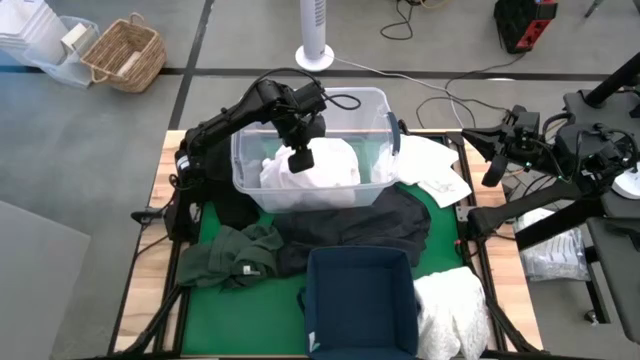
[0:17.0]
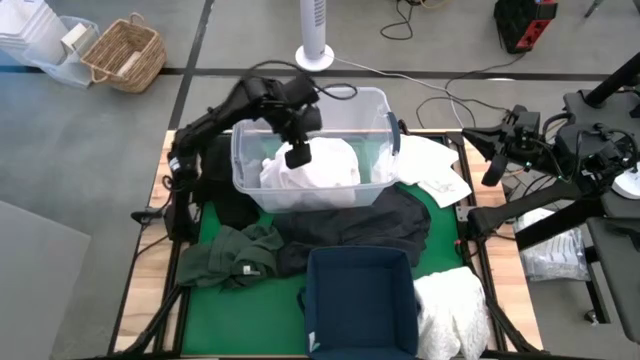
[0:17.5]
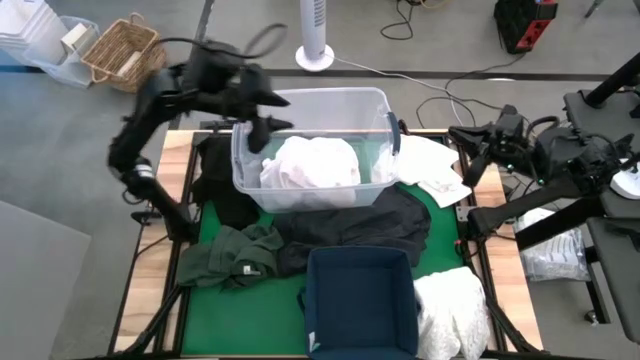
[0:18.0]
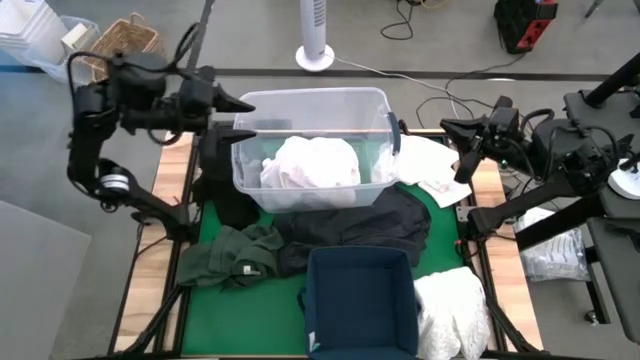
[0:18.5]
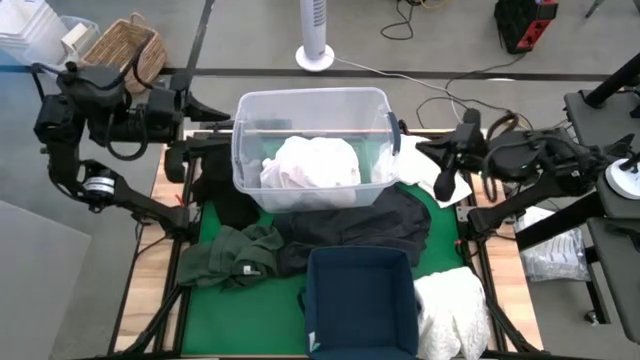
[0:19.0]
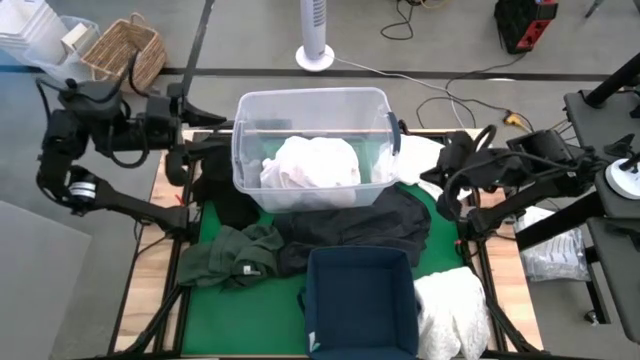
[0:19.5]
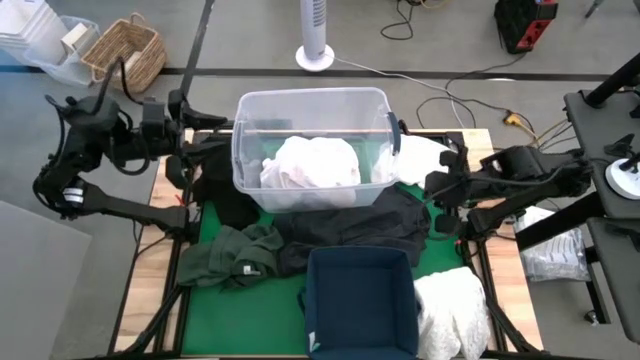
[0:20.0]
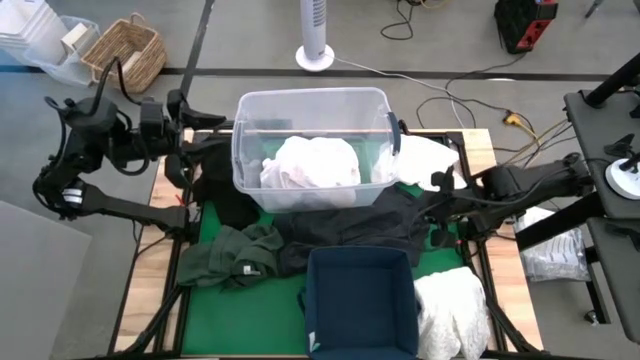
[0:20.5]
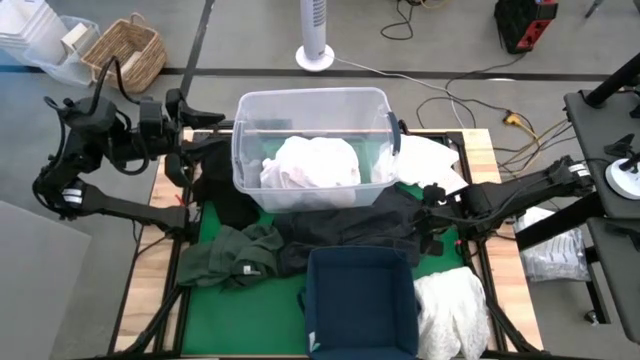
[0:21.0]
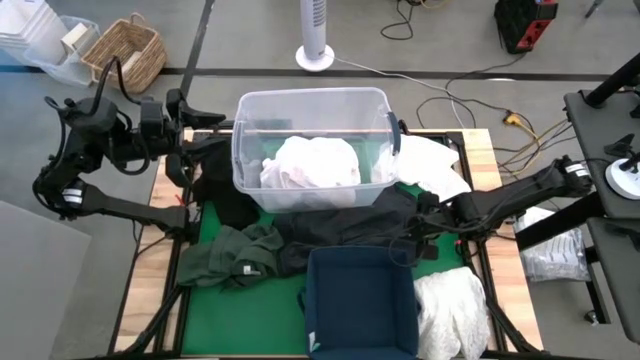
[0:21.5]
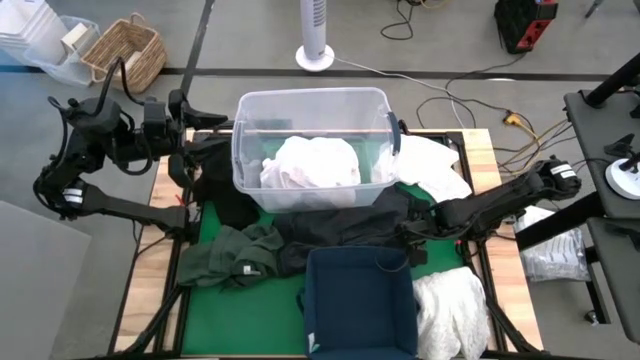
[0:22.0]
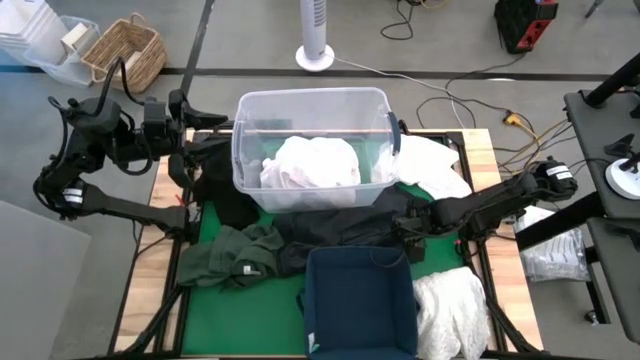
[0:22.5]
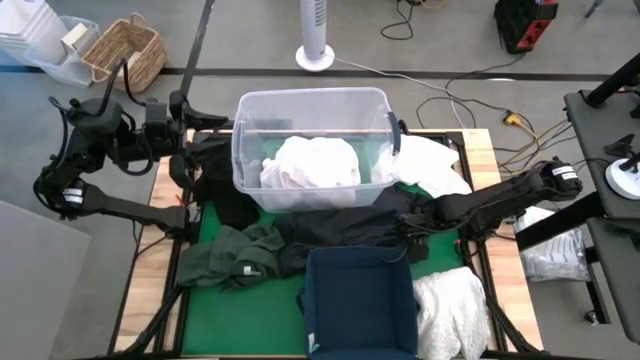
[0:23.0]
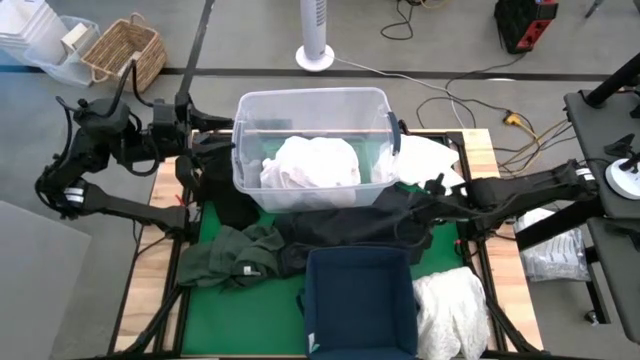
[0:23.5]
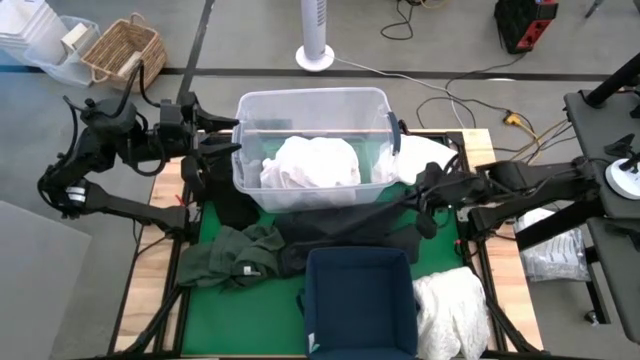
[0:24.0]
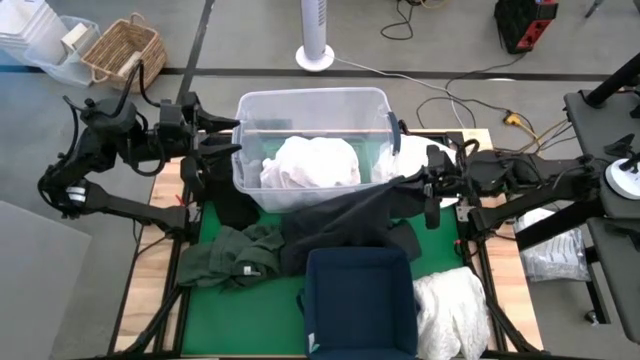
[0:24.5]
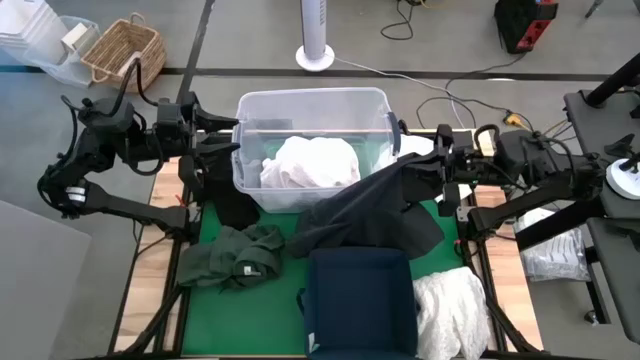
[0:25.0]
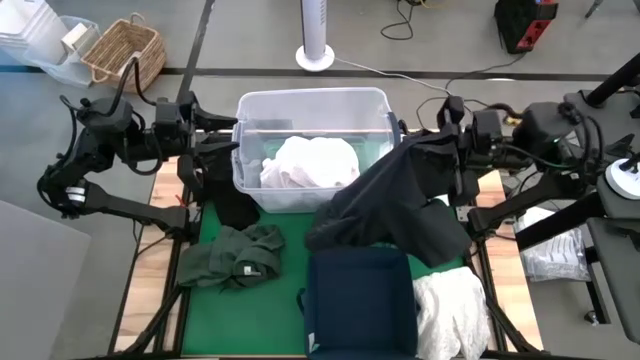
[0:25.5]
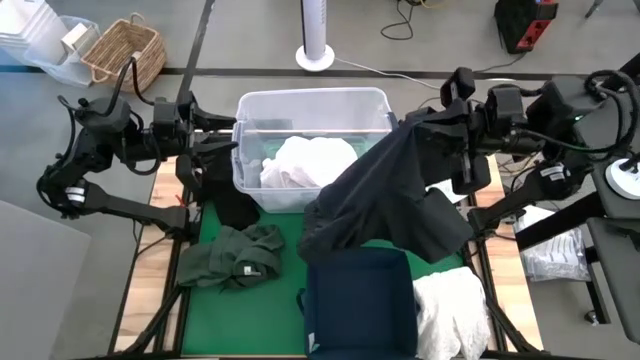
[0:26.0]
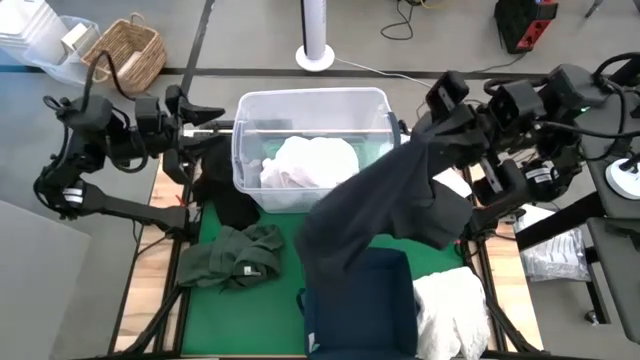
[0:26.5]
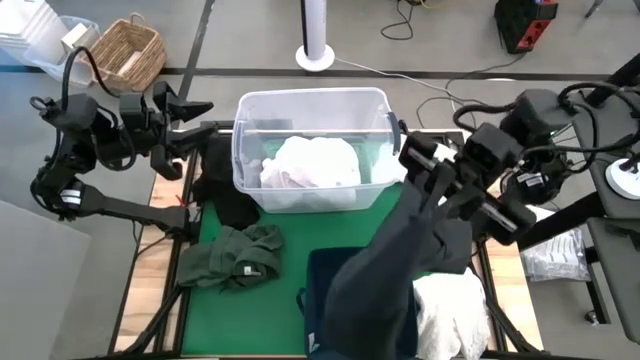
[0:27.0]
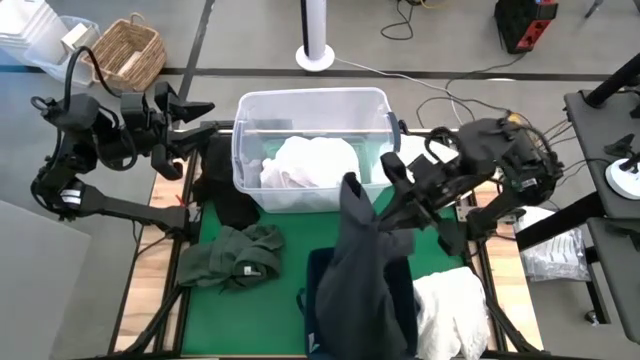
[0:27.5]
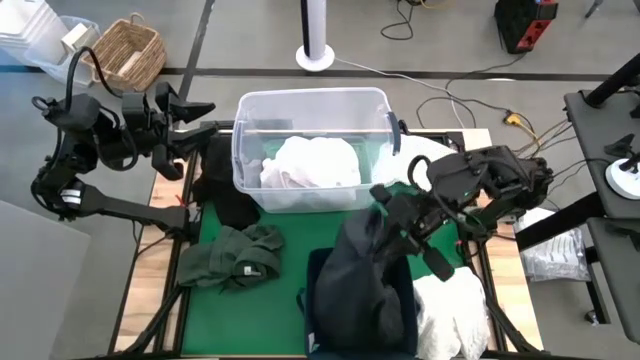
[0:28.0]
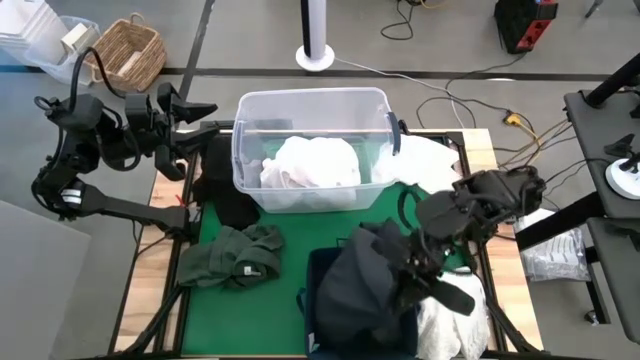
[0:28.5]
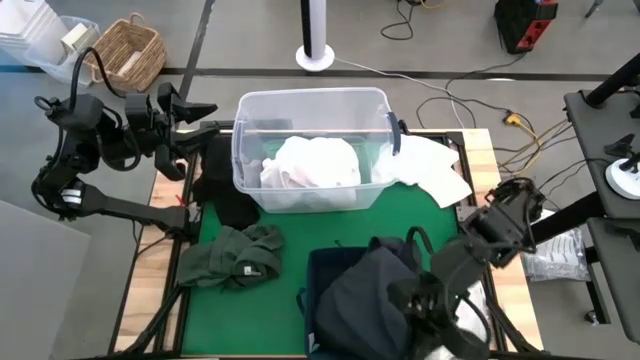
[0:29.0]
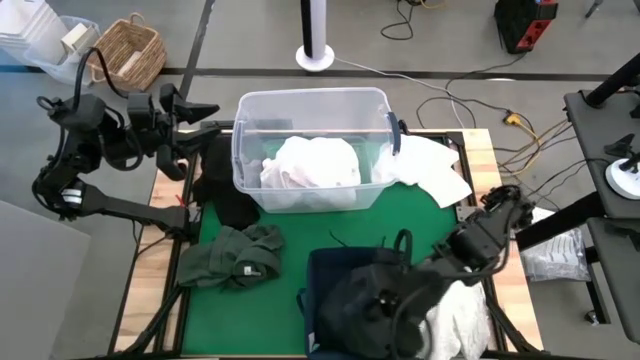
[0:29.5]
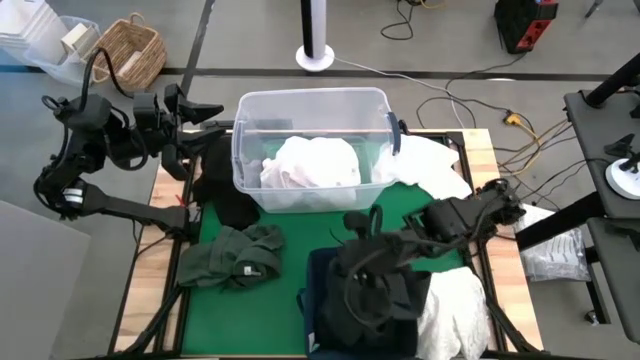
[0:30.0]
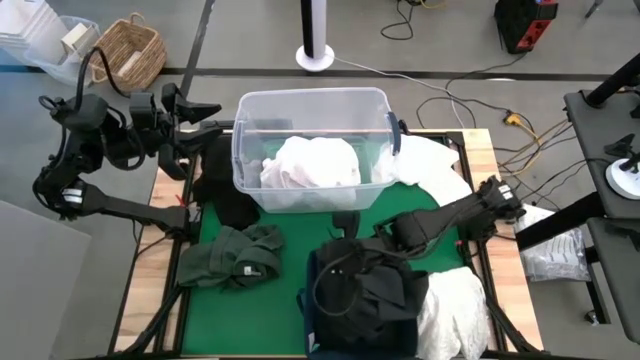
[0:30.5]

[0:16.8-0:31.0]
Put the black shorts into the blue laundry bin

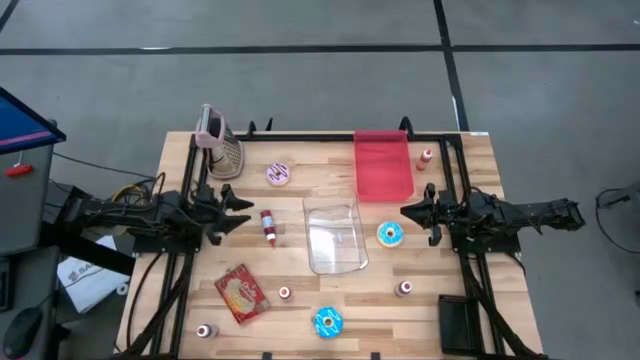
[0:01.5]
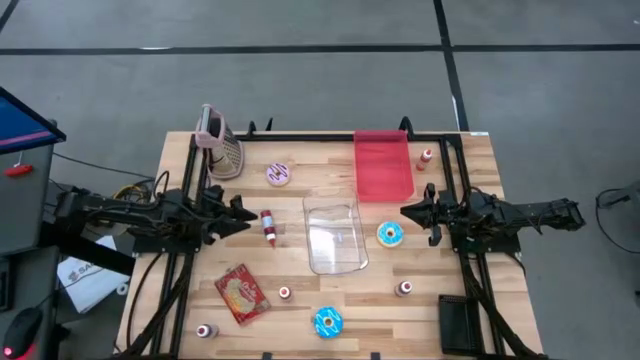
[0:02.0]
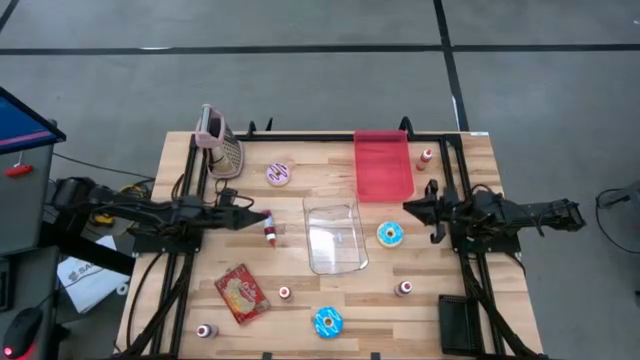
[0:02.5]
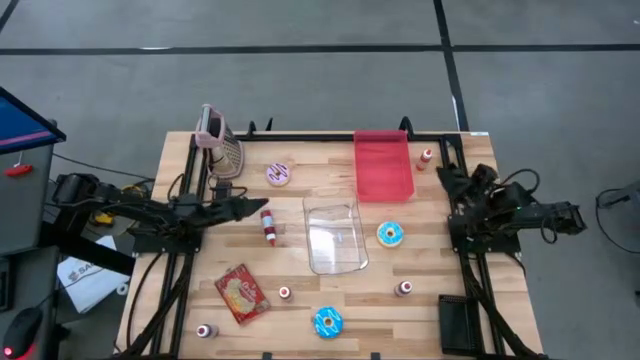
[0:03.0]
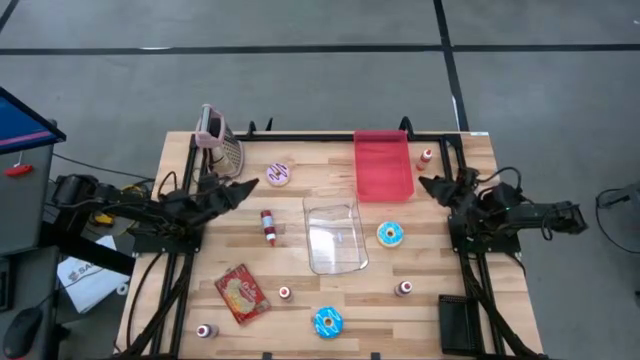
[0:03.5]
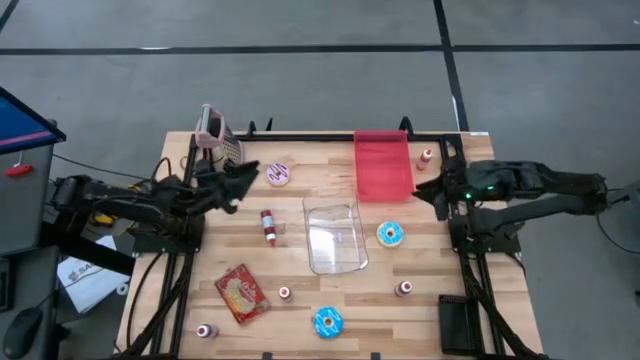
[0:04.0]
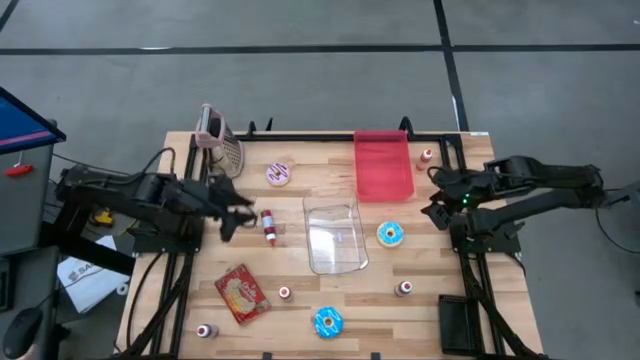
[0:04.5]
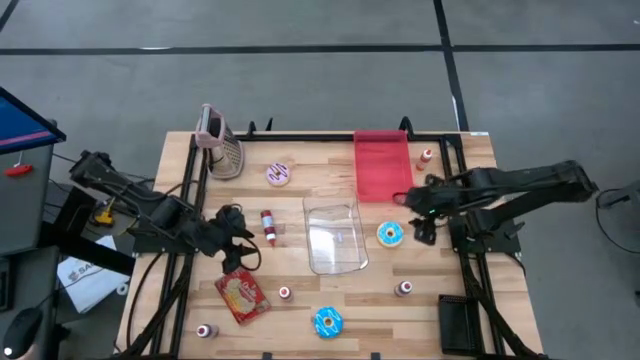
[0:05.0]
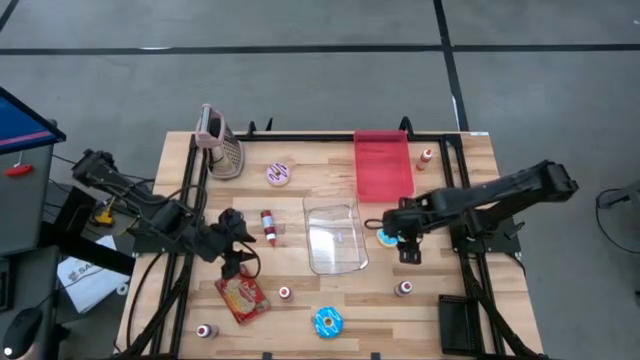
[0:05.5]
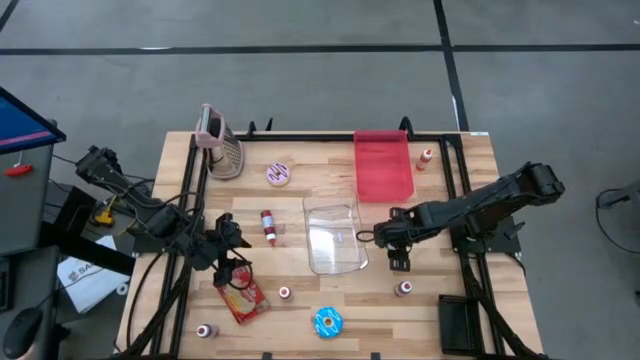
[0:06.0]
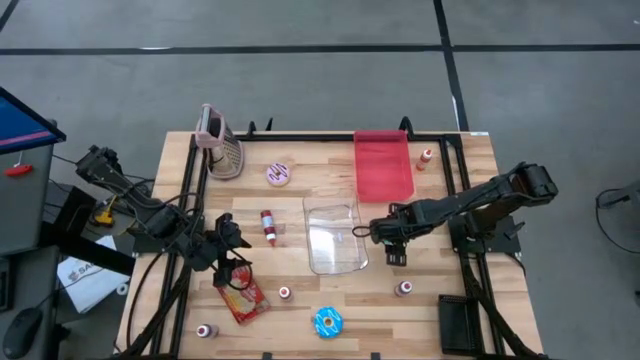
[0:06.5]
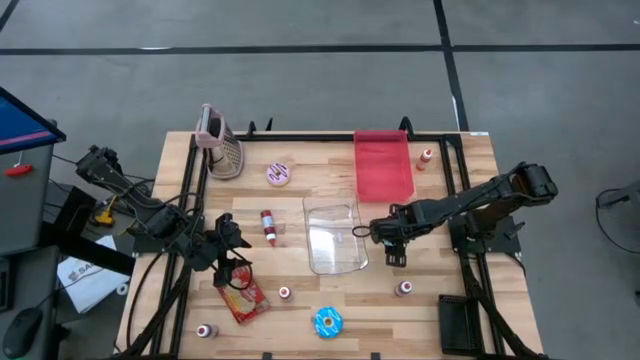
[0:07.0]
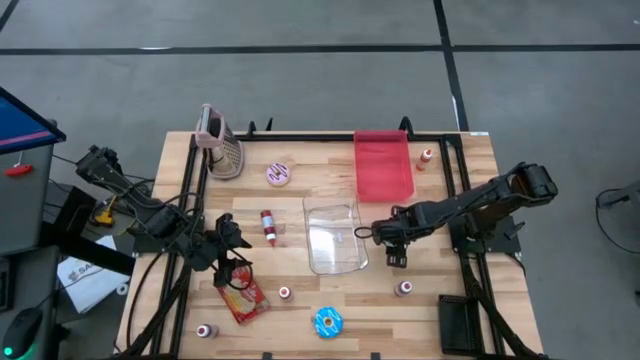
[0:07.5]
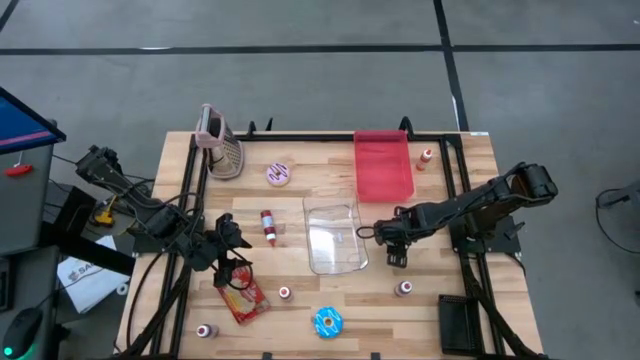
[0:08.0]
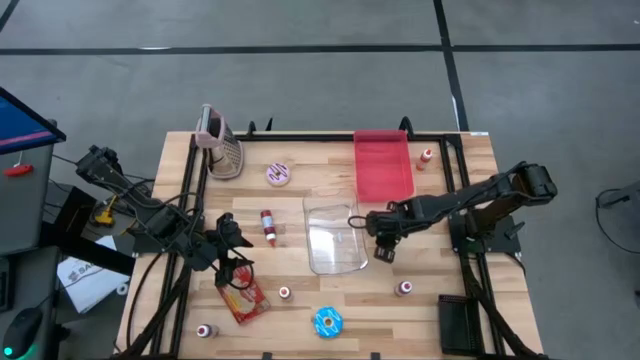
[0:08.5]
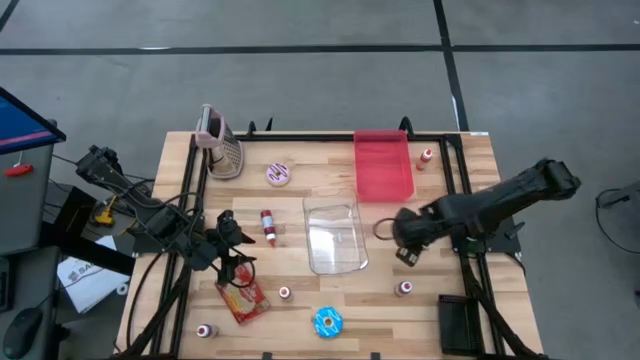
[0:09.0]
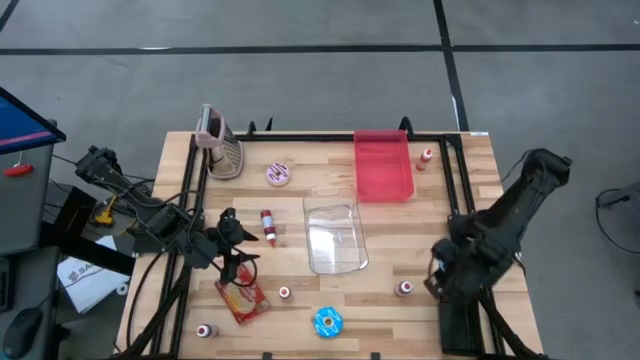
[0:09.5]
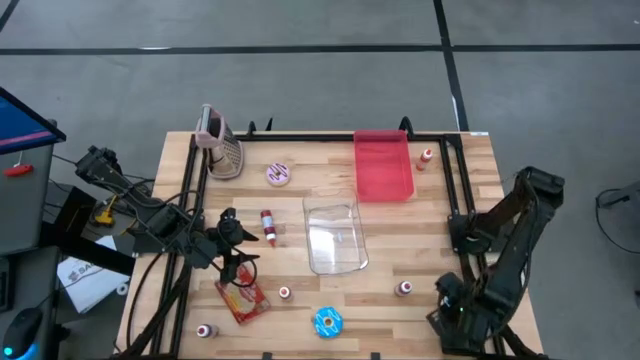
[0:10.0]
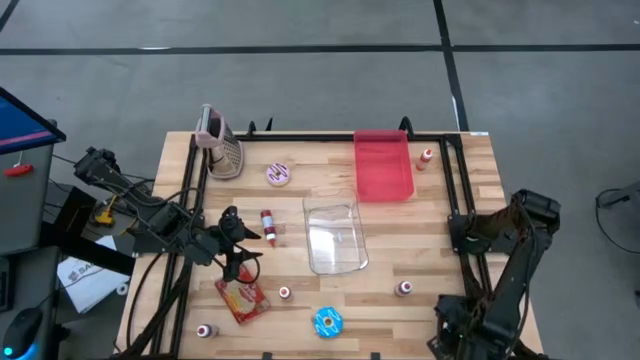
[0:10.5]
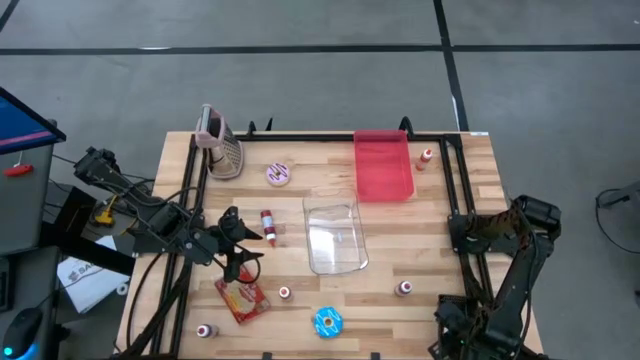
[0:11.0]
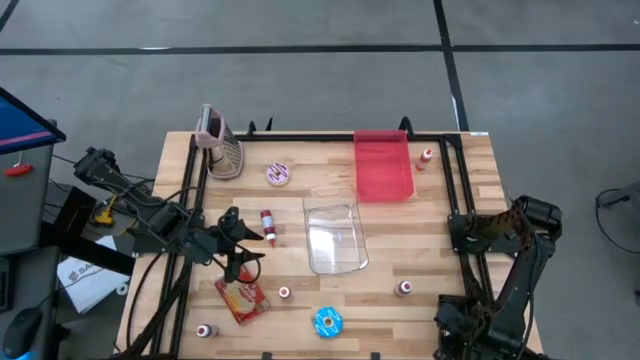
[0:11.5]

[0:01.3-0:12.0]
Put the top blue donut into the black bin
